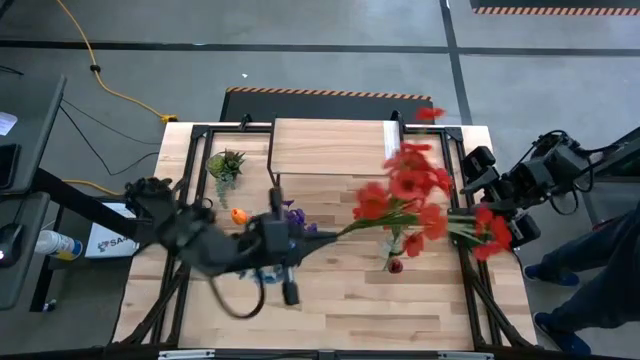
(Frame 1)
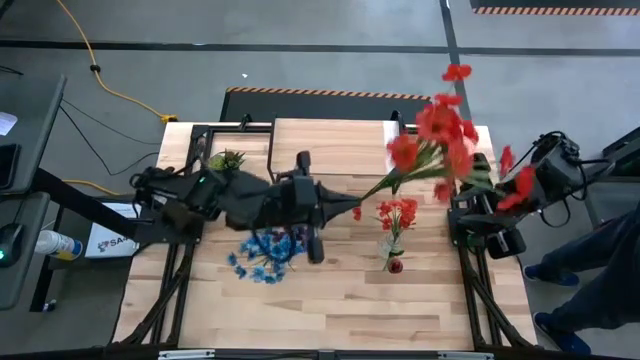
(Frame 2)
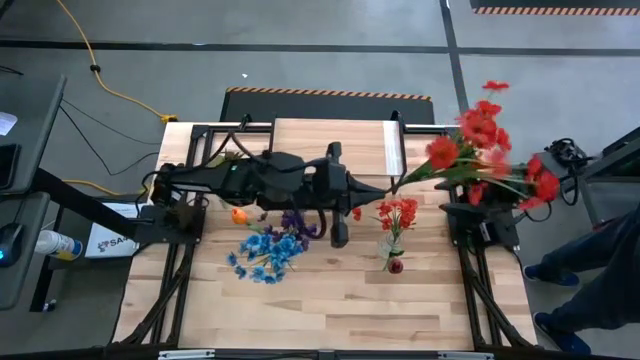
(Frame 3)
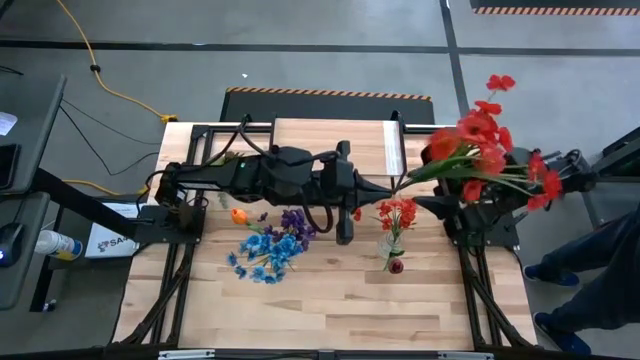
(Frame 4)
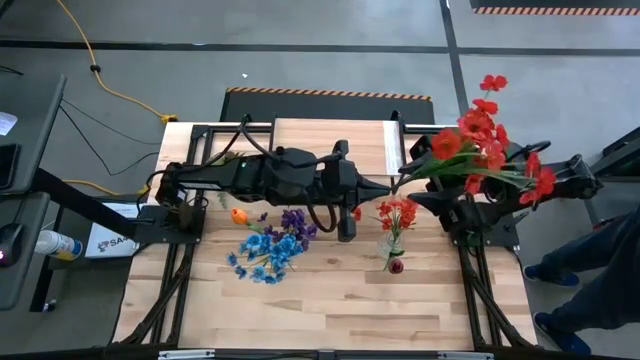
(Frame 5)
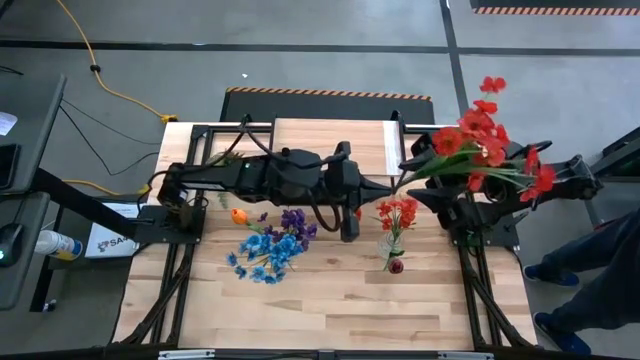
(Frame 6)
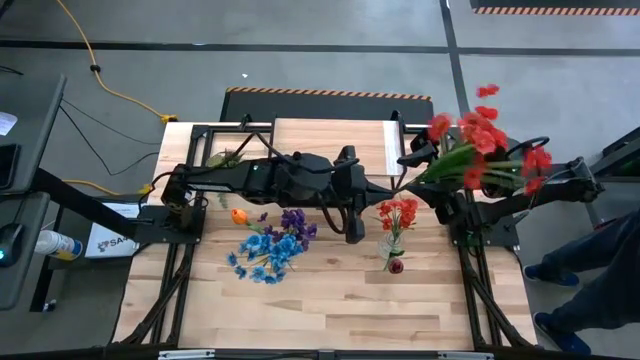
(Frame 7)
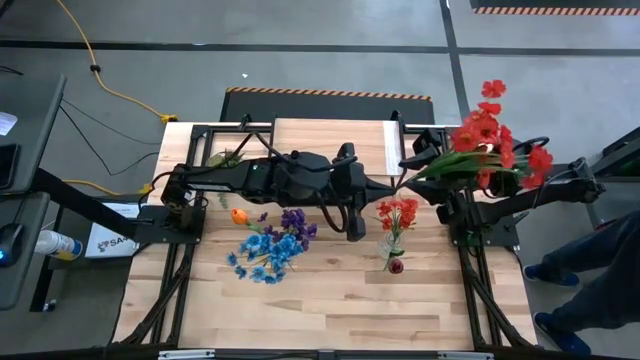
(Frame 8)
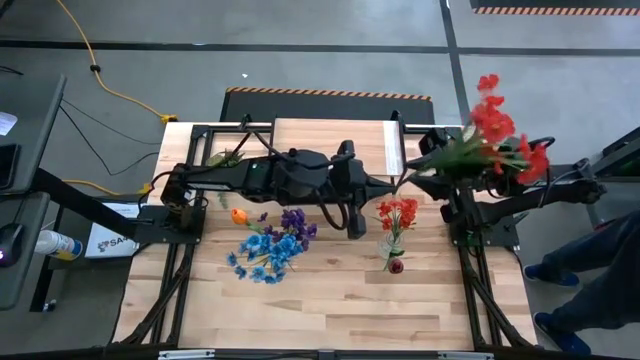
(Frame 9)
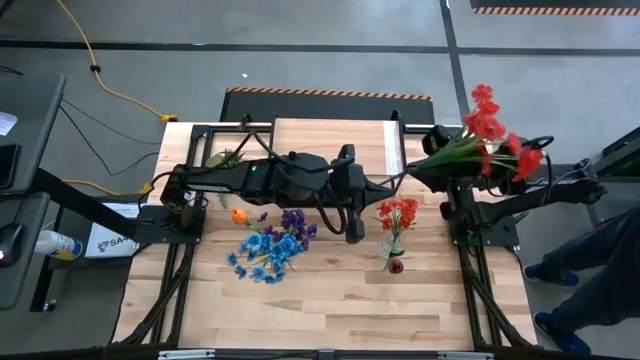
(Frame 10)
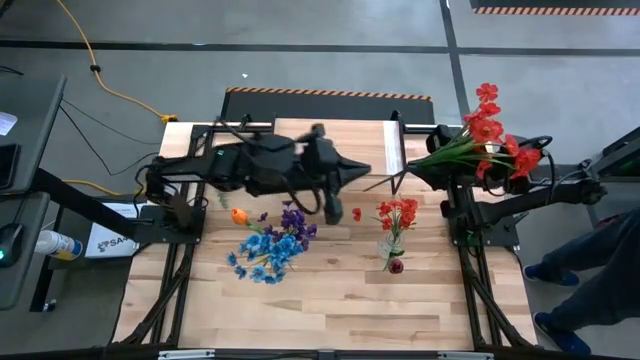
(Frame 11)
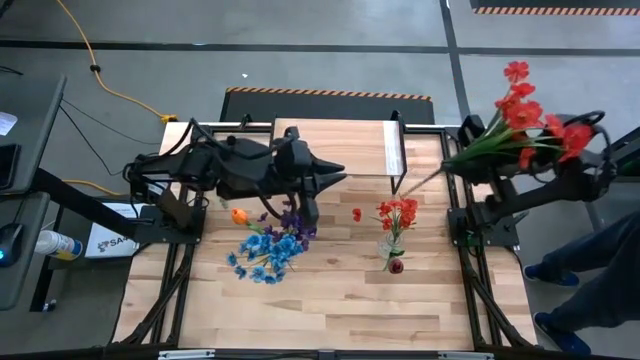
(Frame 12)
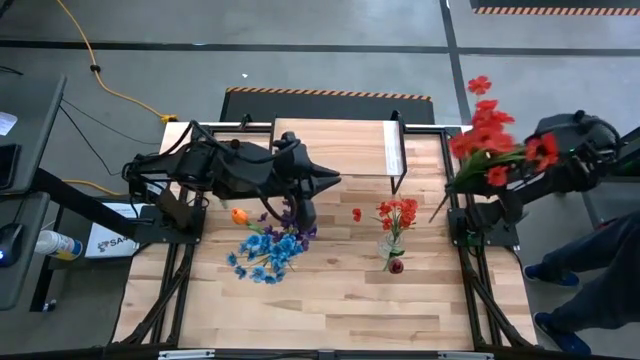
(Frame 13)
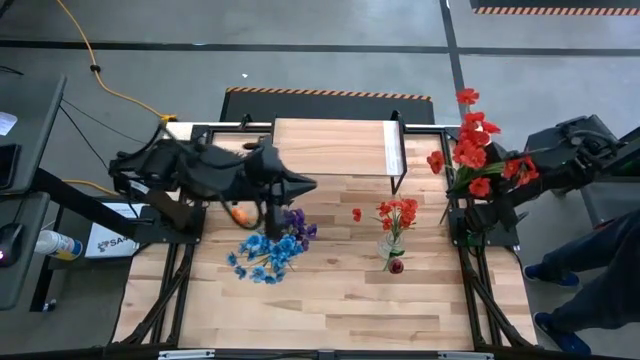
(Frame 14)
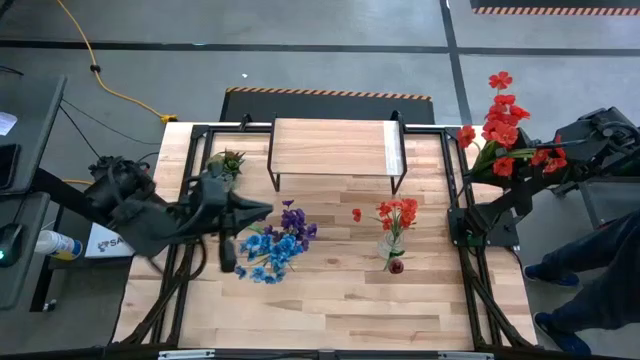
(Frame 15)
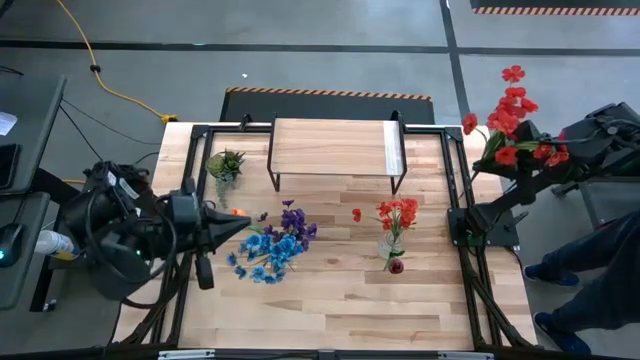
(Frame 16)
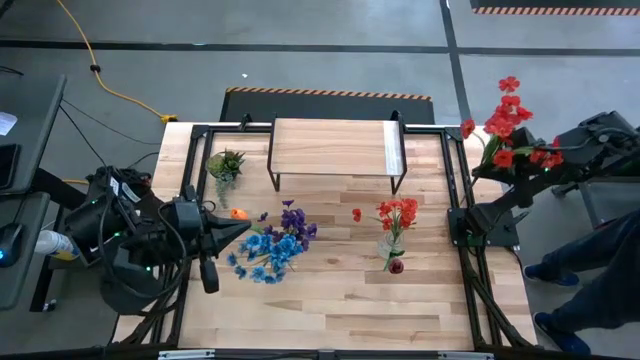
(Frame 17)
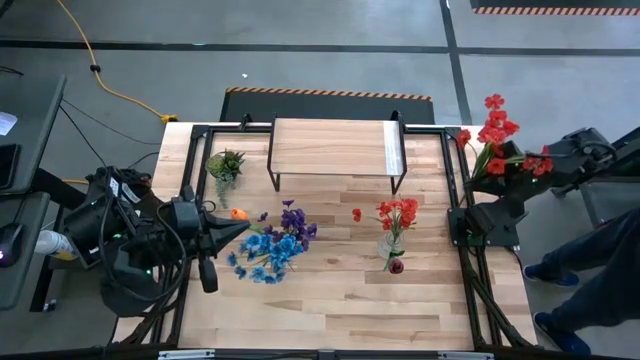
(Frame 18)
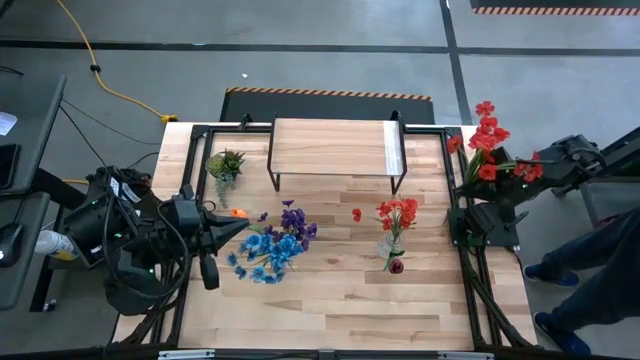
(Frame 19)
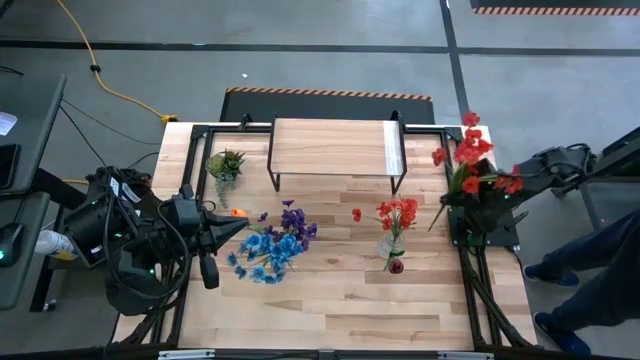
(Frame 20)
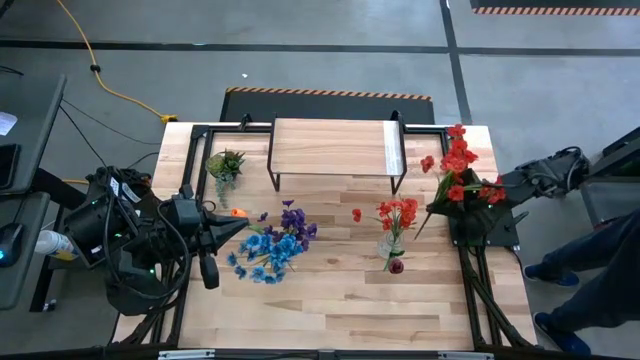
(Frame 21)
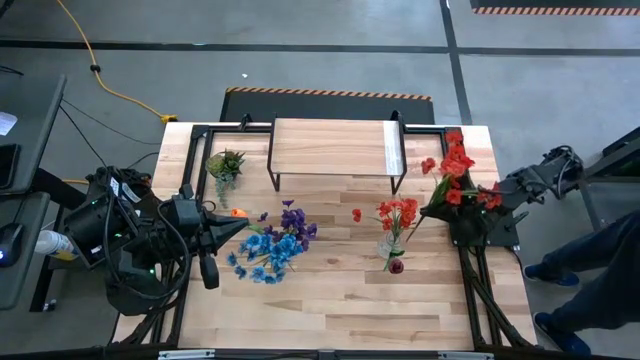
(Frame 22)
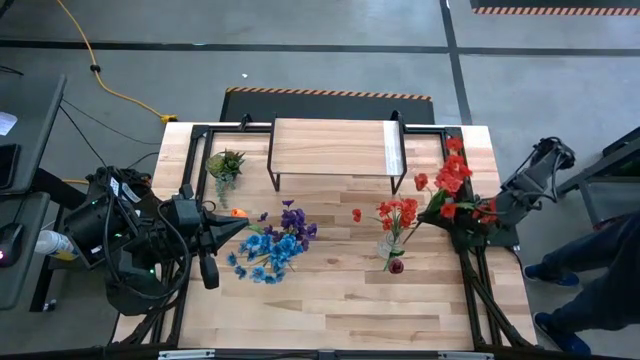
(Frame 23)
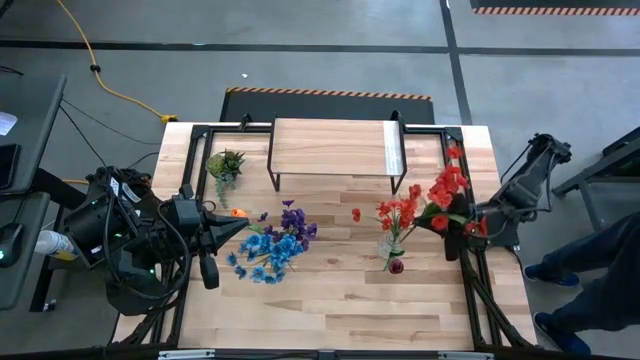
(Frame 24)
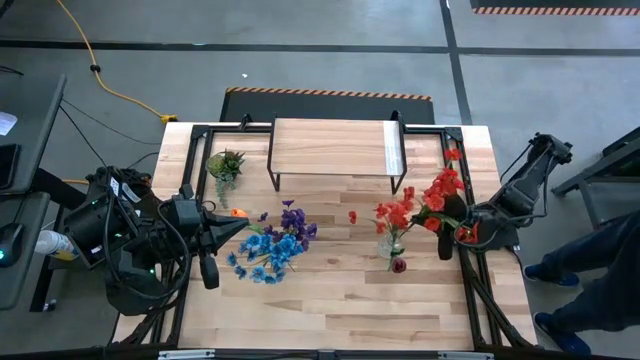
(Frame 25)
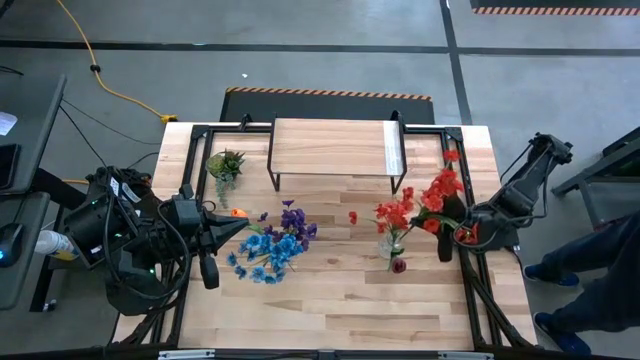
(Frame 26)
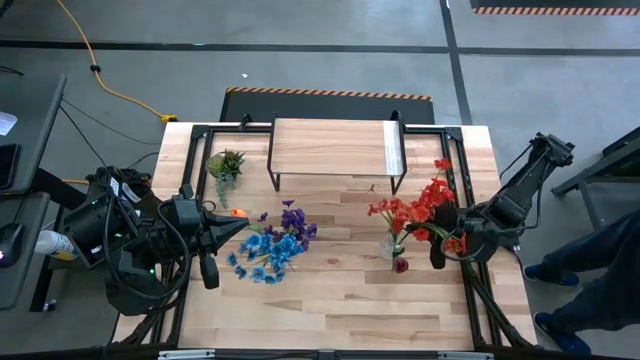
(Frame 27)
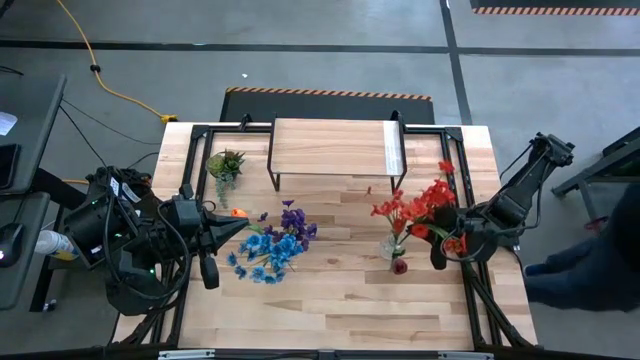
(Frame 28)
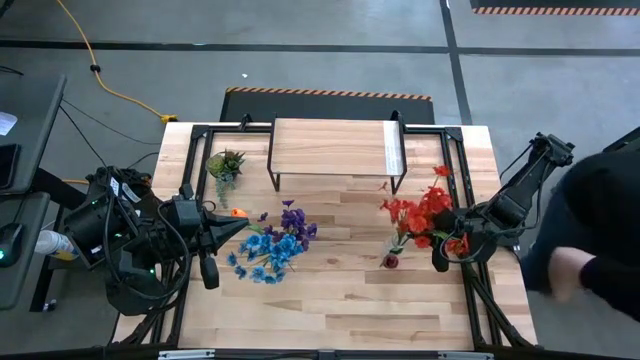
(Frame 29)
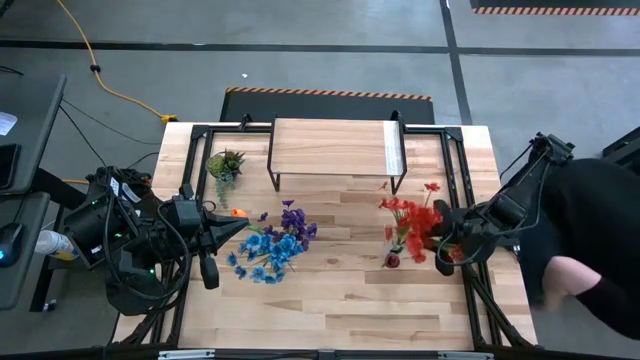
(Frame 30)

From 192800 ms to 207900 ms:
Task: Pick and place flowers into a vace then onto a shelf
Put the red flower into the right transparent bin

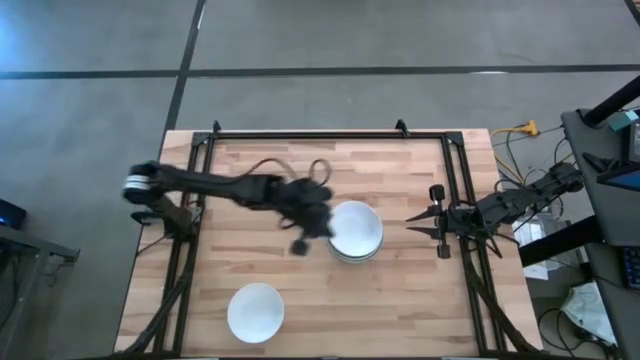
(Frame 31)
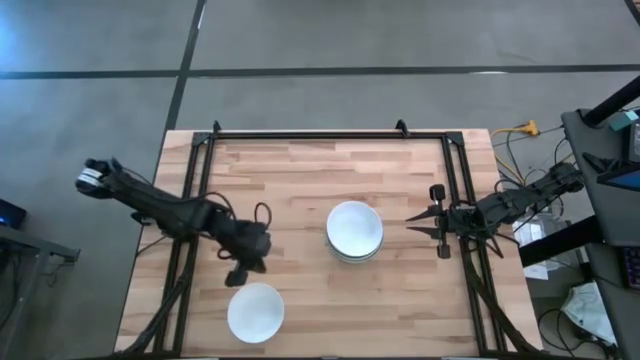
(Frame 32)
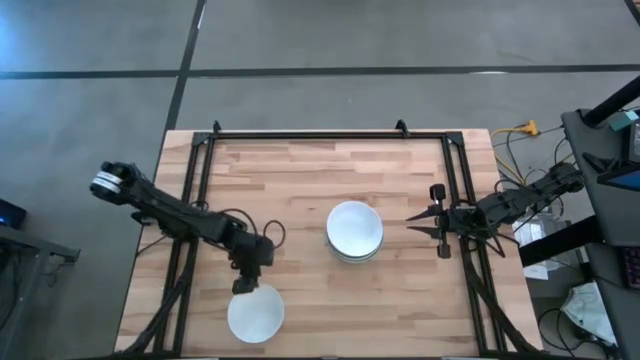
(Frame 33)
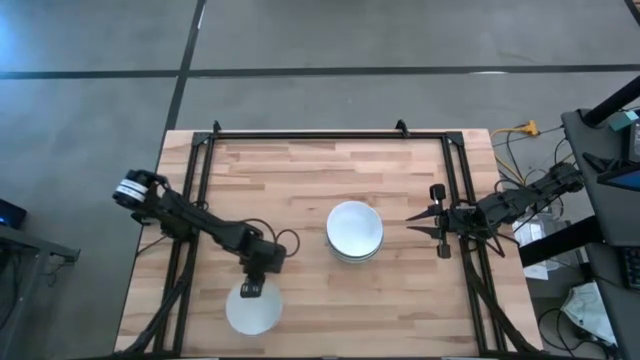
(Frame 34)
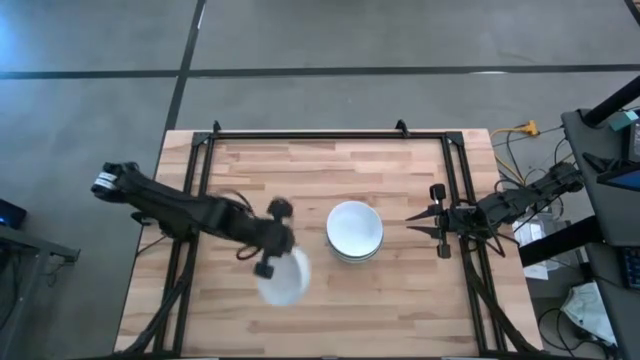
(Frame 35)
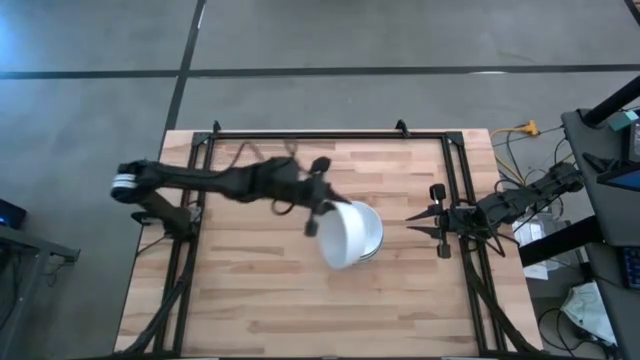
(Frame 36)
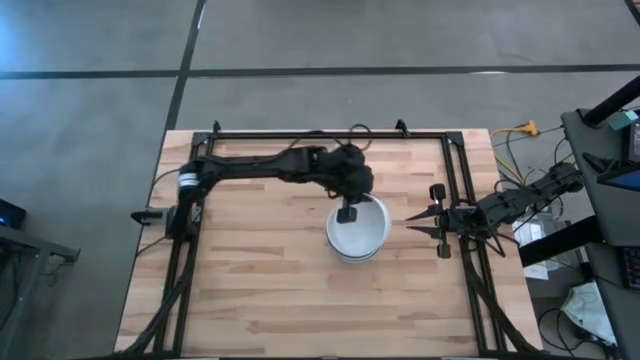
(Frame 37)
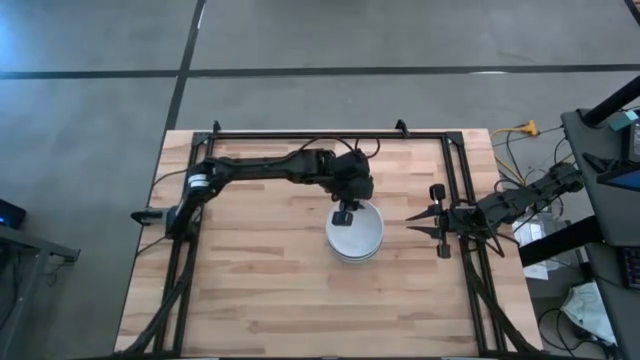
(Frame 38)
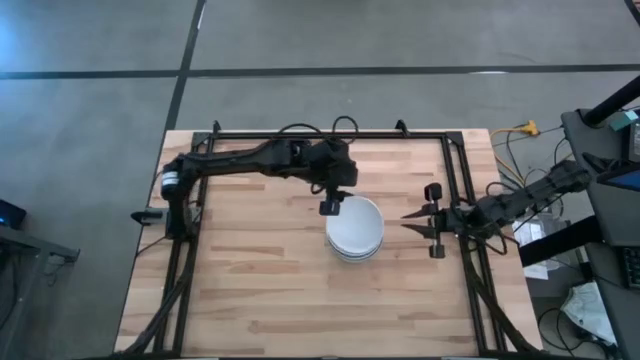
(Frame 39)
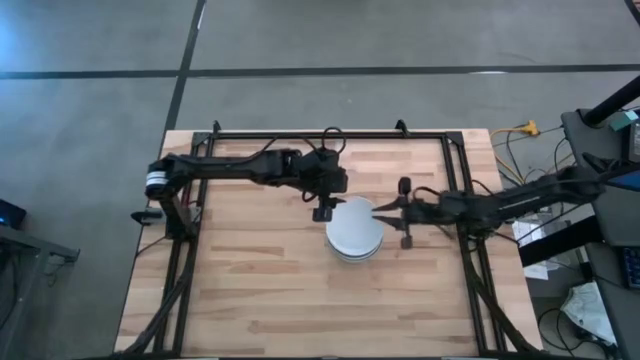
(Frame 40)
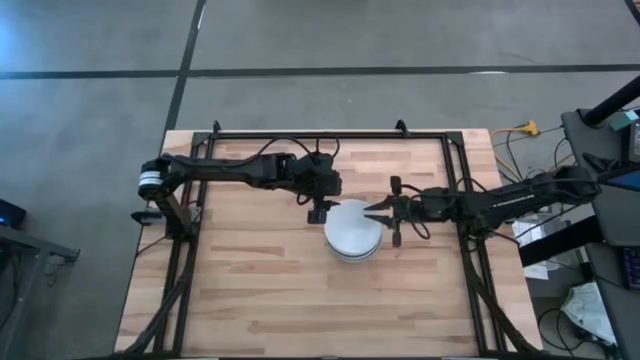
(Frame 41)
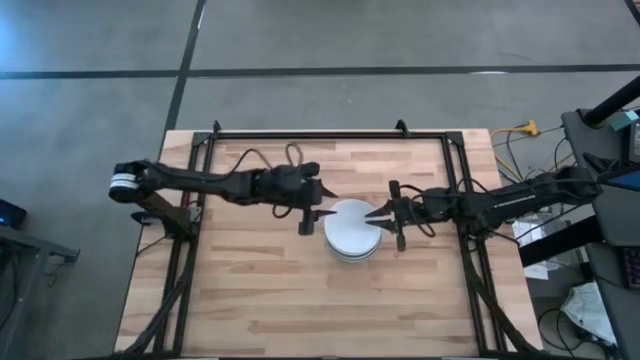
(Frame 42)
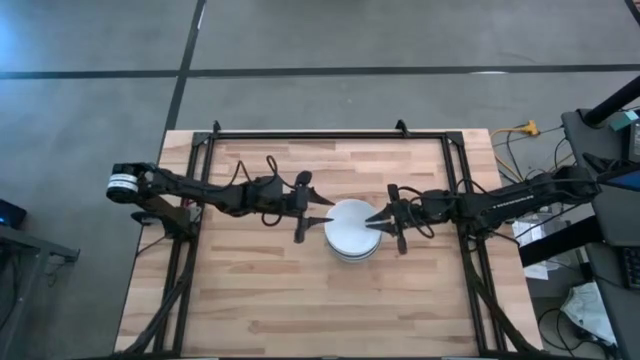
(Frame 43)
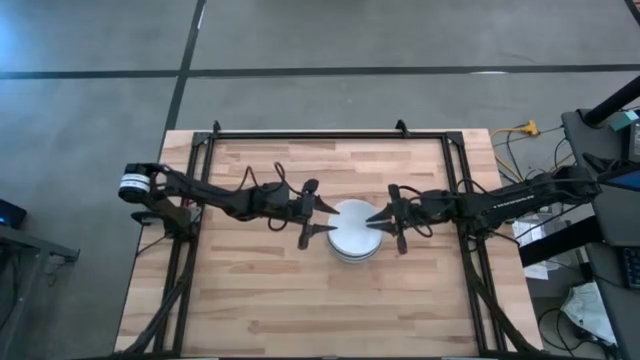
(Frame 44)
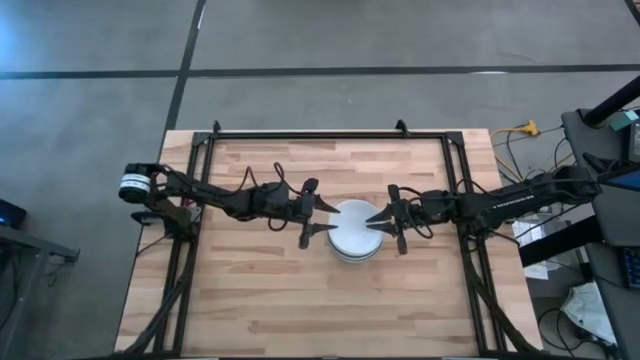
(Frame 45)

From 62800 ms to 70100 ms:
Task: Nest bowls inside each other
Stack the white bowl on top of the other white bowl
